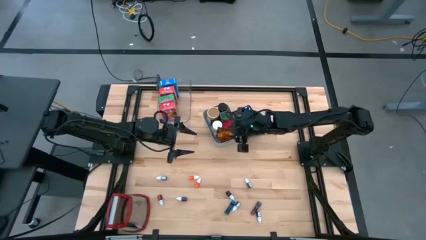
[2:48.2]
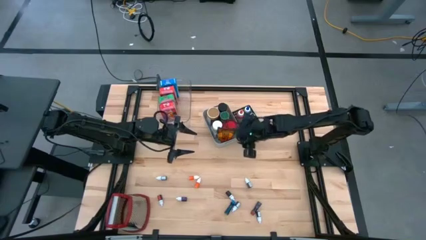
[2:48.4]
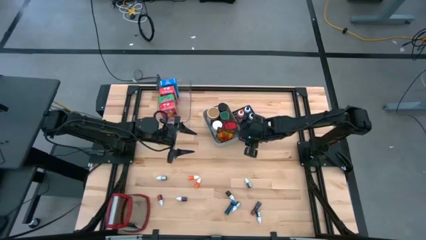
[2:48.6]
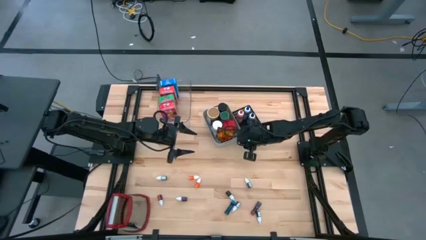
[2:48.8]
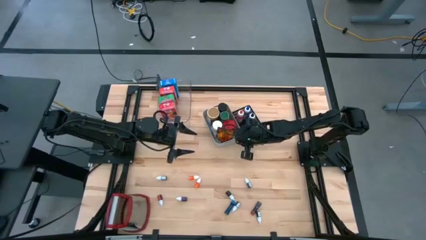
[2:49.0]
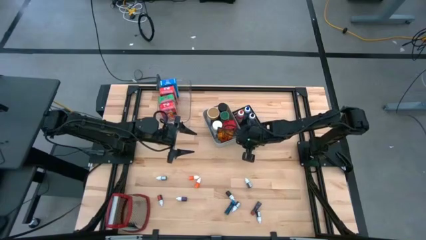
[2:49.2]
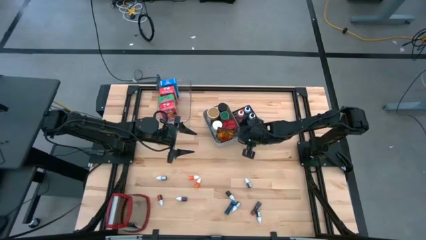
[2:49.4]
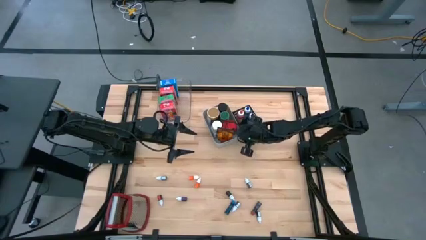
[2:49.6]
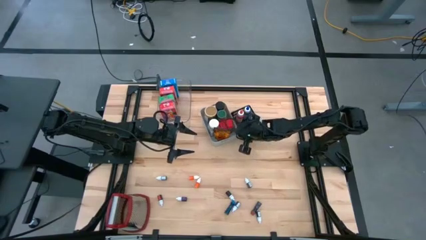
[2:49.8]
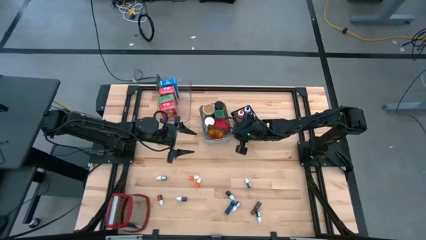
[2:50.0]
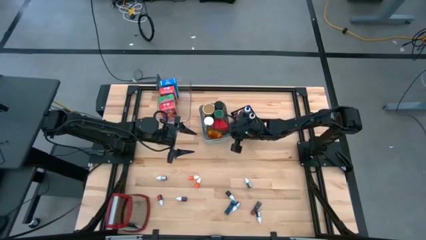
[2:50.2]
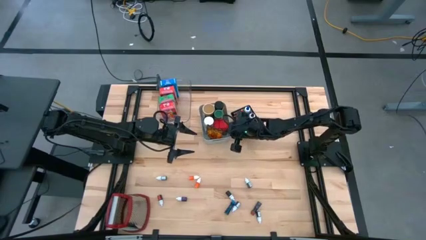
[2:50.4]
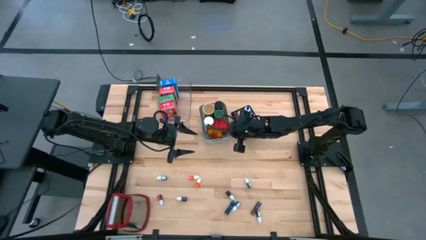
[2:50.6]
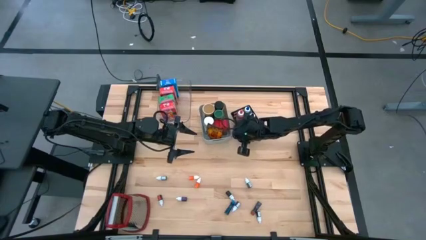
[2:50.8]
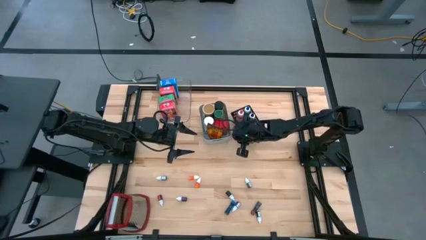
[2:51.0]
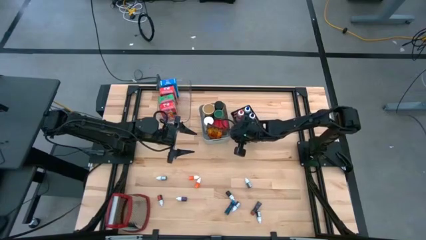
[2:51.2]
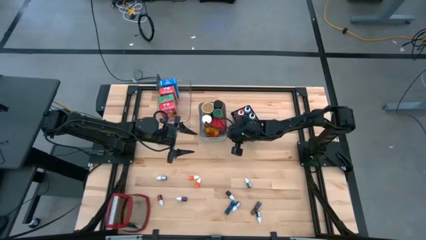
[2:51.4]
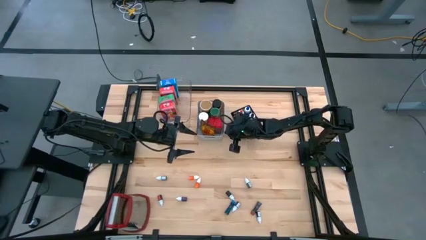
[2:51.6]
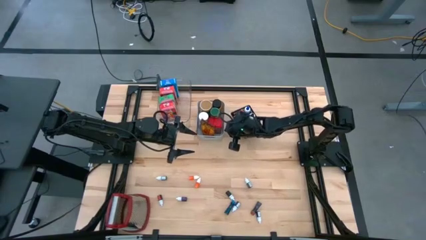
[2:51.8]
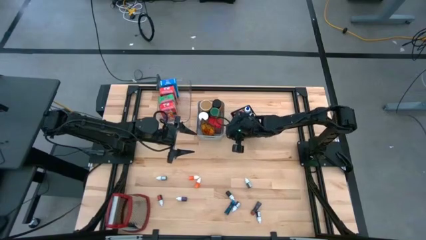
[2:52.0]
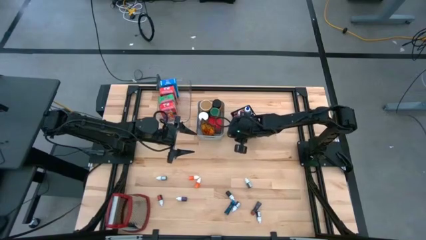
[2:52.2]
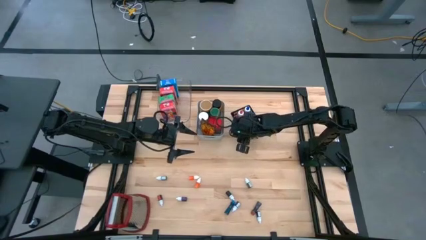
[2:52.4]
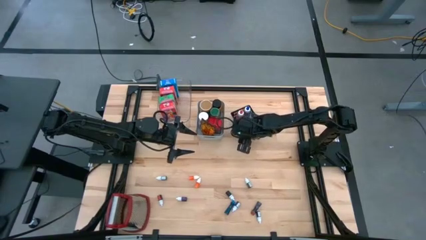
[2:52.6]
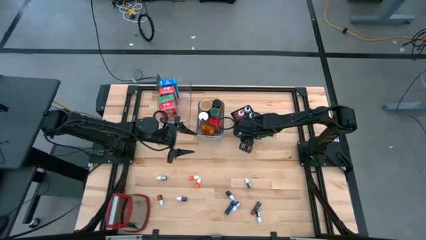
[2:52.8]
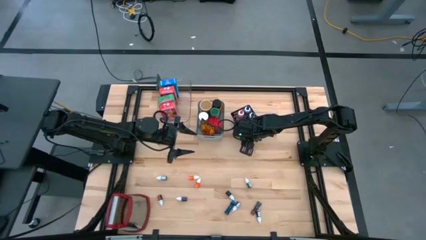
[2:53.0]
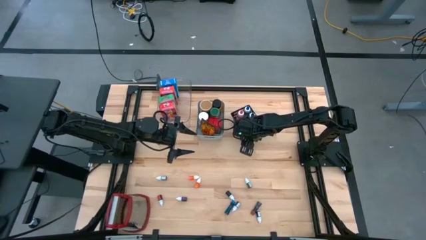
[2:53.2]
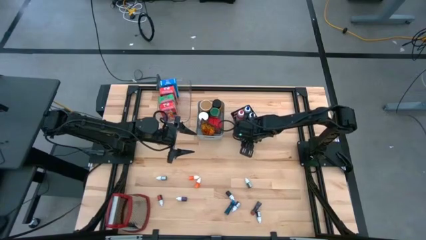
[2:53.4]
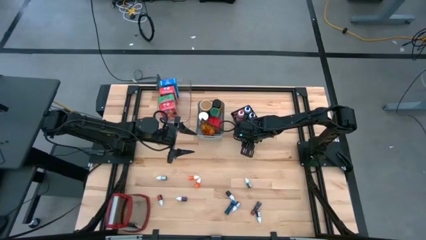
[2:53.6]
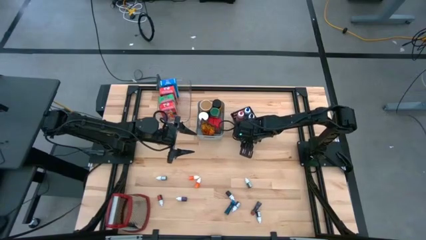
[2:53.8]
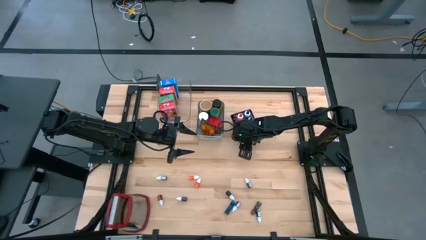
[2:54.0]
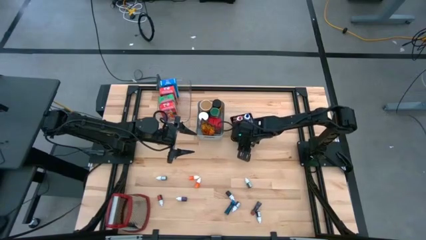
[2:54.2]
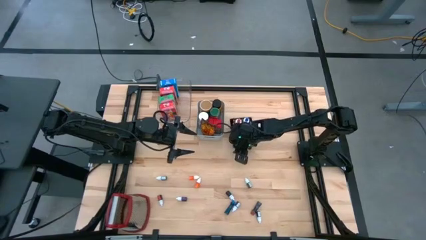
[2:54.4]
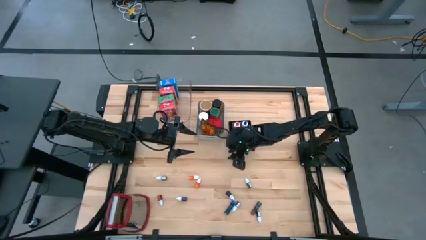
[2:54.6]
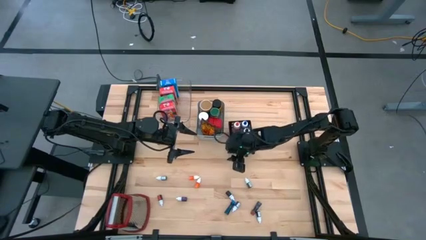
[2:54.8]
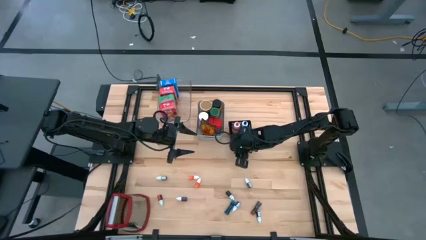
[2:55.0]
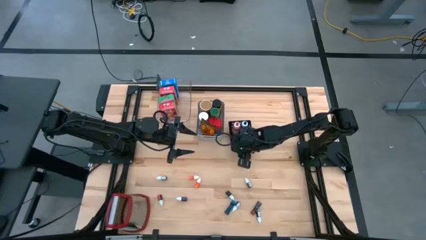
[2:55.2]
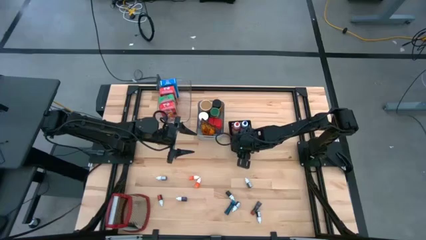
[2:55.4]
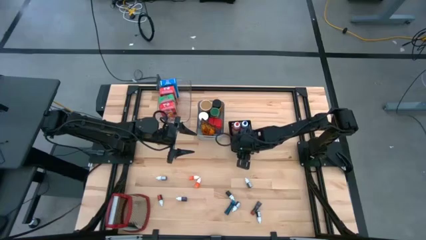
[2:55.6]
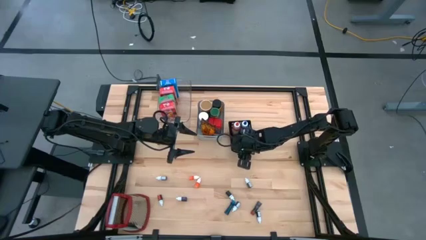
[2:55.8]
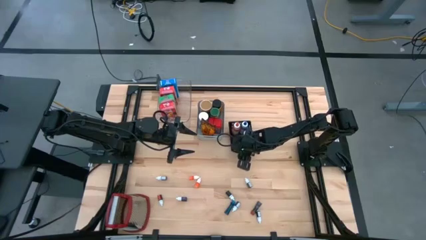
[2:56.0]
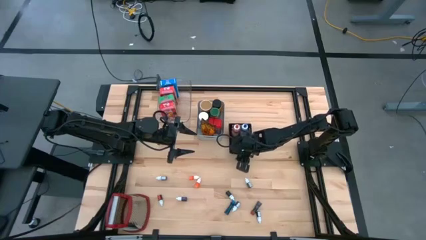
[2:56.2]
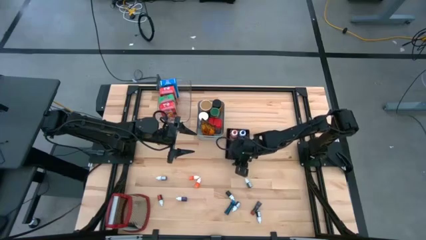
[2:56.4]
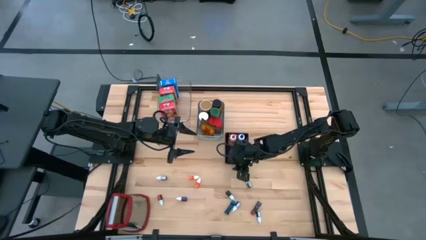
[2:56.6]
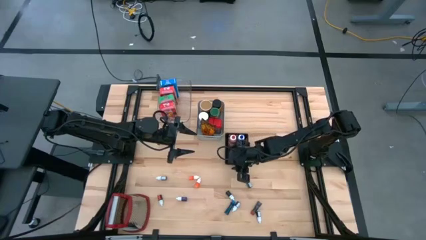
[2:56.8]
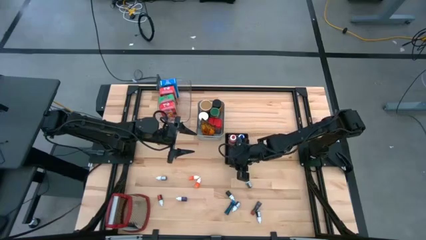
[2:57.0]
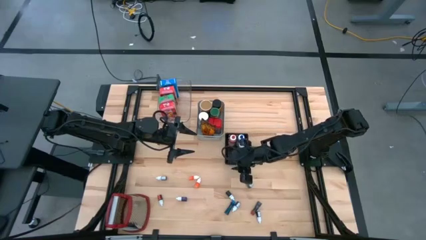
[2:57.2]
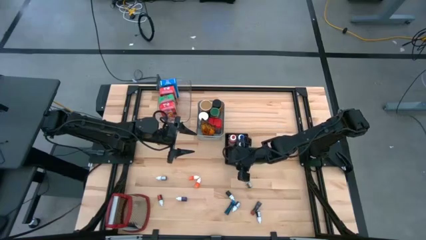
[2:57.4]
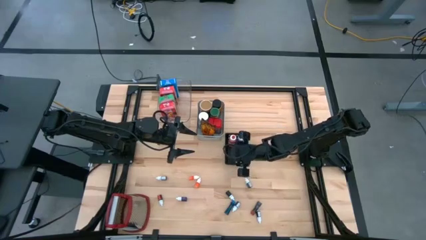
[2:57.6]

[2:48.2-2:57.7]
Task: Pick & Place Kitchen Items
Adjust the bins

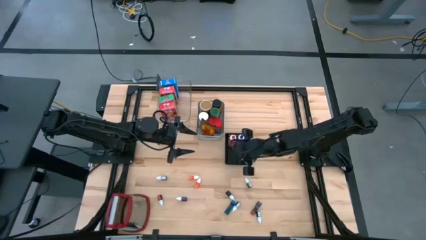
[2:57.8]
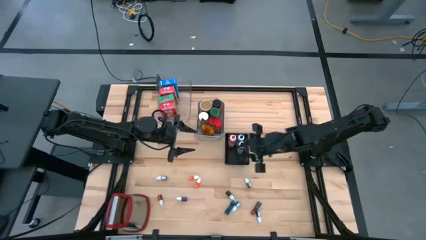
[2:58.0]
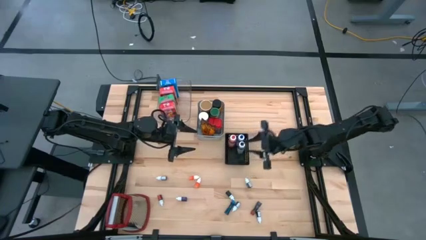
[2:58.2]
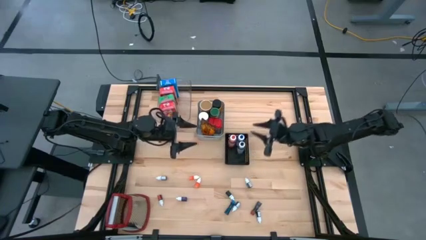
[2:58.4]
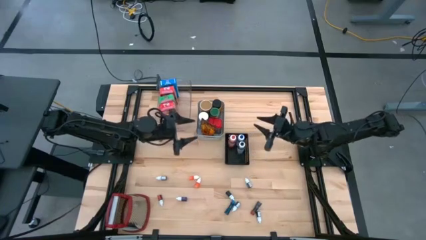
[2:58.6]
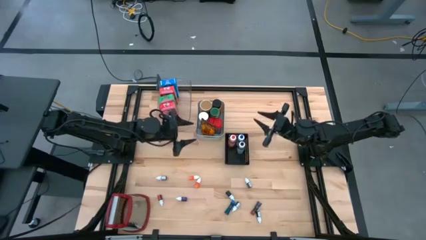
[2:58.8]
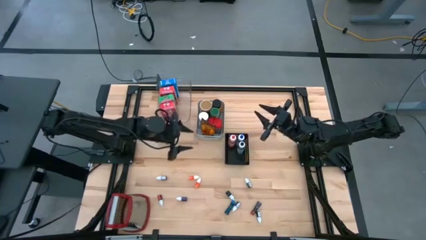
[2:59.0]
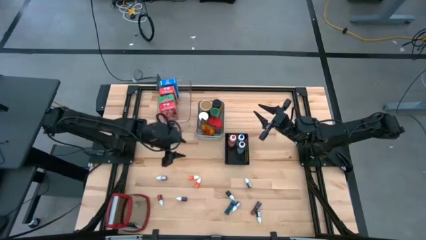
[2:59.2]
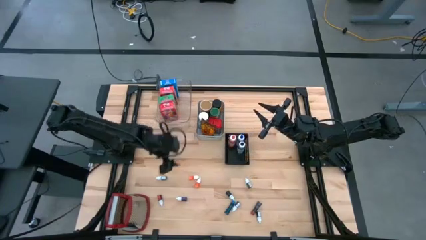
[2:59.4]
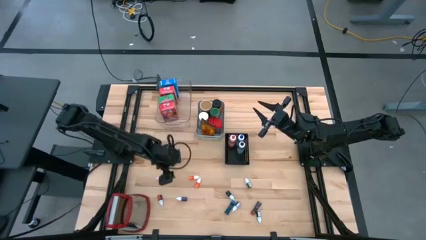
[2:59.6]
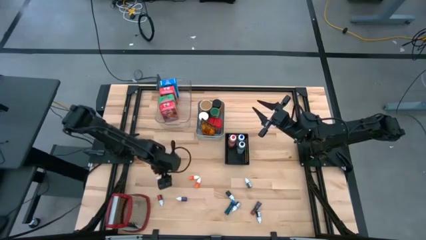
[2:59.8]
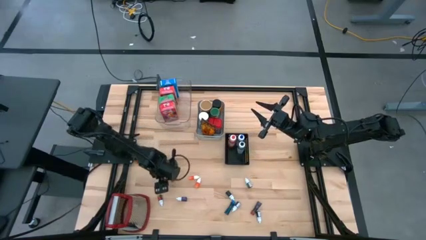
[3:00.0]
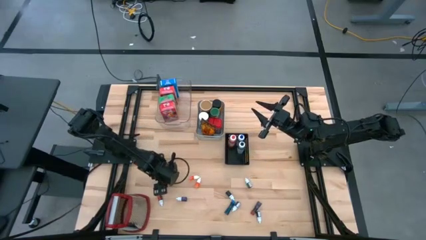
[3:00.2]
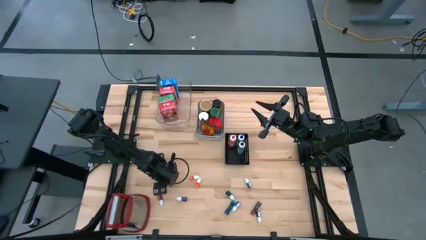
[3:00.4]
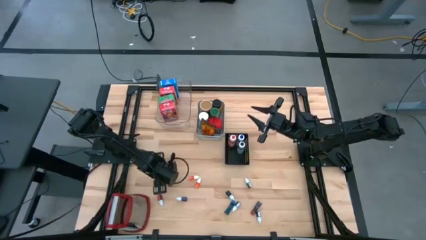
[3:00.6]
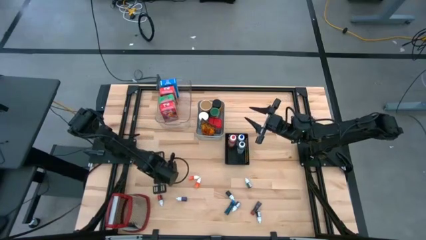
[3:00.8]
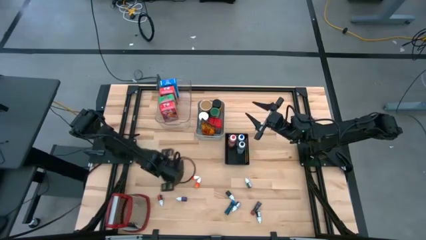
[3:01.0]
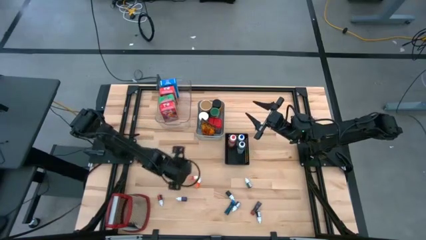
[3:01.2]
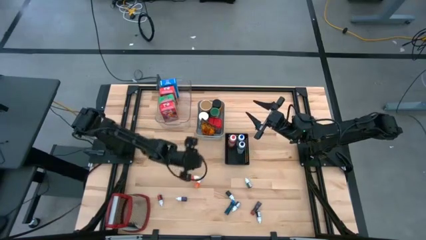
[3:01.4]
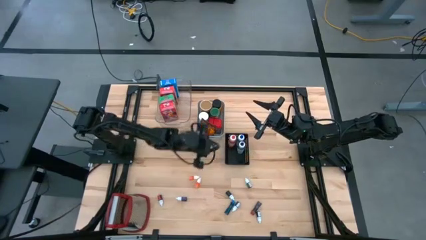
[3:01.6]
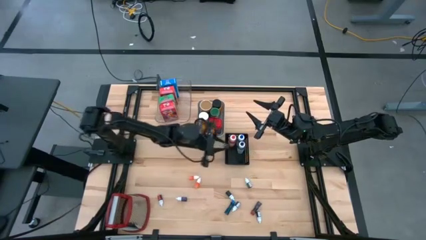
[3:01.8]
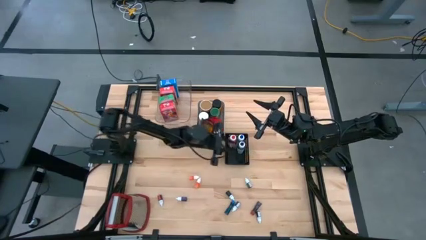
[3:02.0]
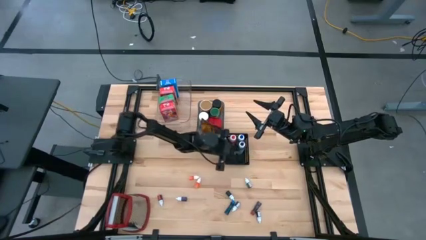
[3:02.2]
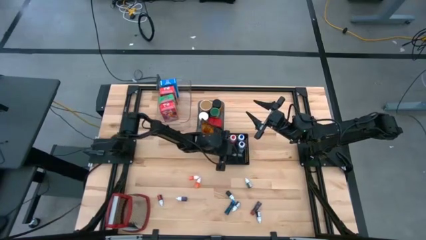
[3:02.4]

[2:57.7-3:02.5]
Put the left black food coloring bottle into the black bin

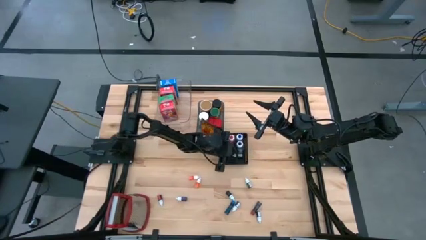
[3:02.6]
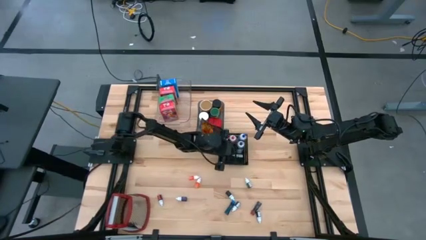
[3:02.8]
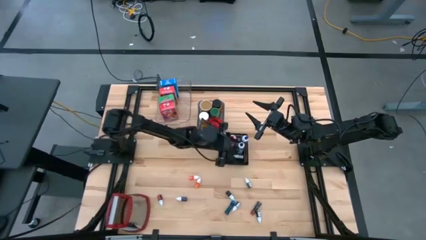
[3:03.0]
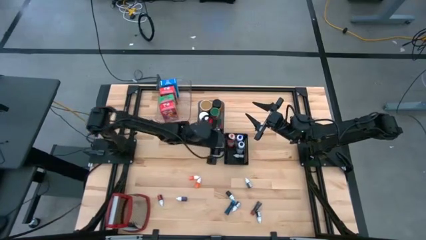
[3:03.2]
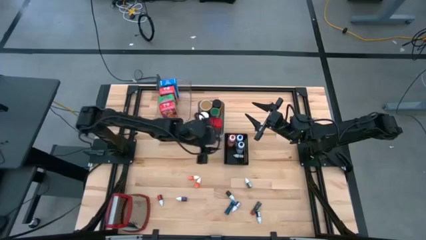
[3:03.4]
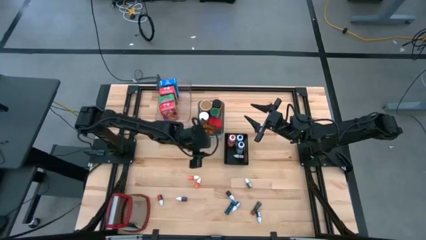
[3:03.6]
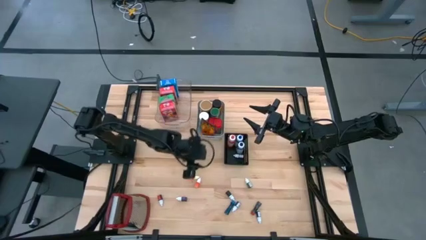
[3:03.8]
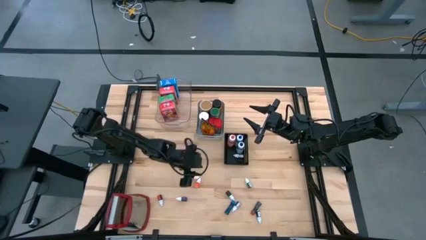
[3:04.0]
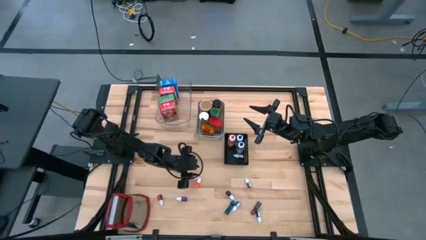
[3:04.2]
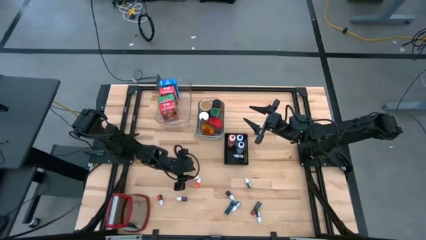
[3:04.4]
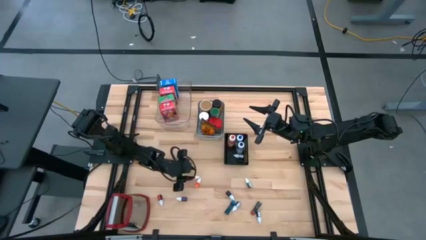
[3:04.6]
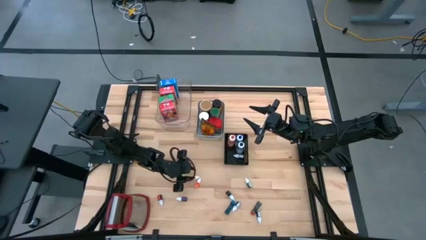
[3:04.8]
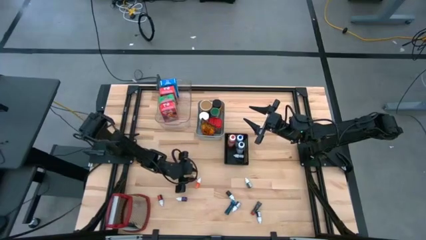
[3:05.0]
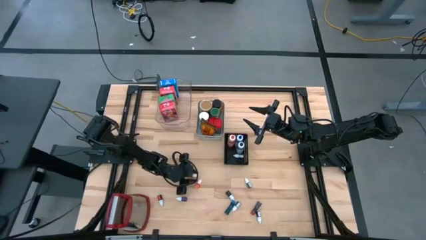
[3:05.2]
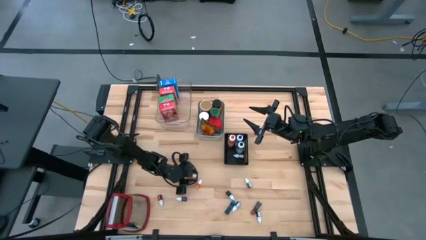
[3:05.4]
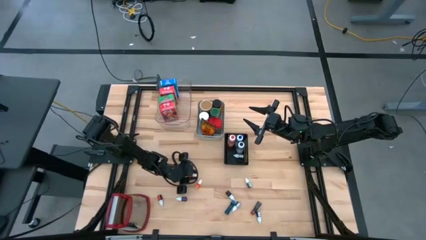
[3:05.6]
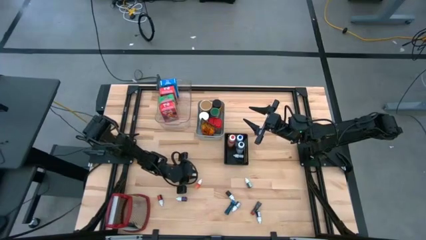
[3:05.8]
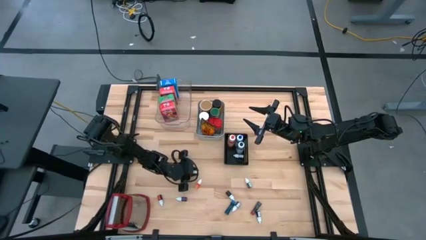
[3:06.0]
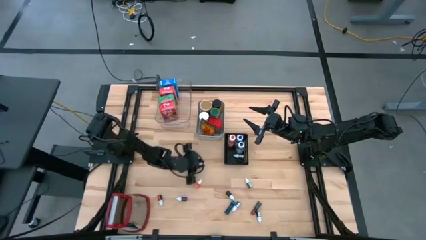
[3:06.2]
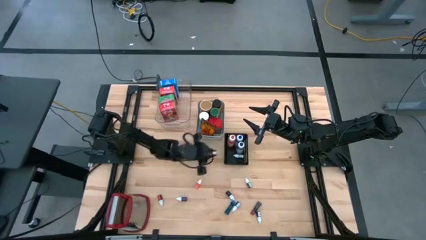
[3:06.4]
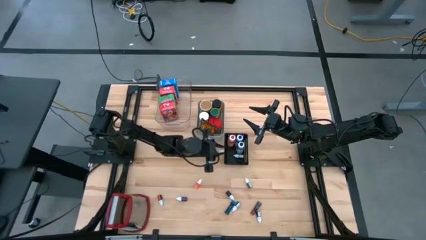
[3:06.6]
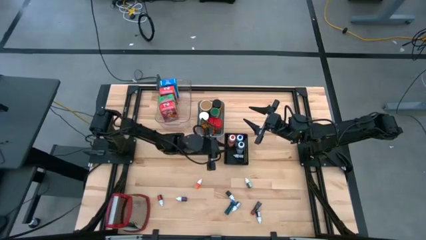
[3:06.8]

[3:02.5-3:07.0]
Put the top orange food coloring bottle into the black bin
